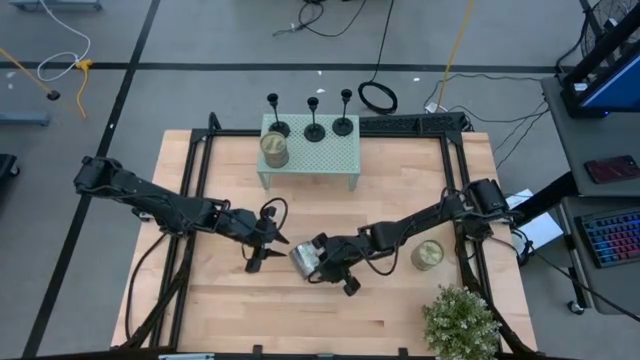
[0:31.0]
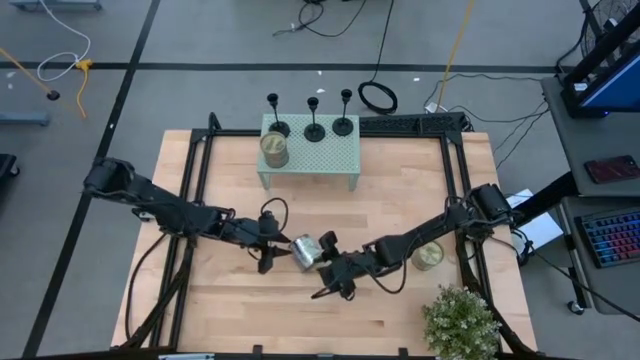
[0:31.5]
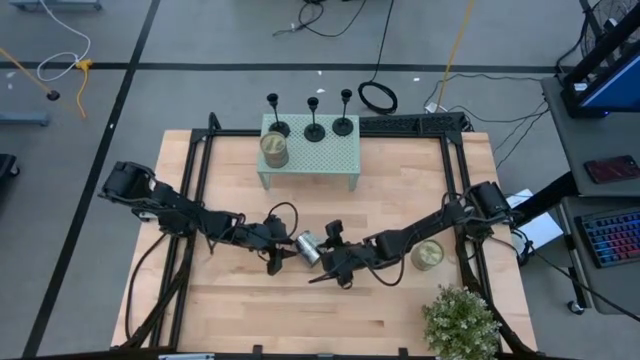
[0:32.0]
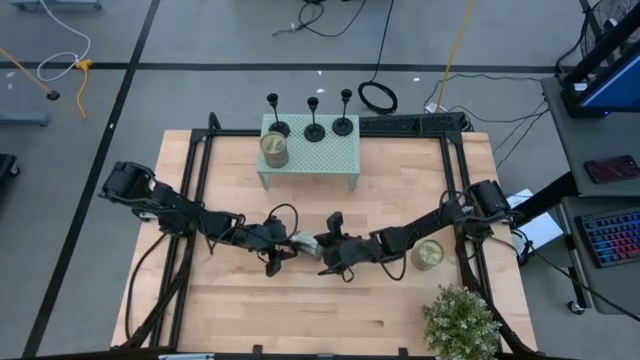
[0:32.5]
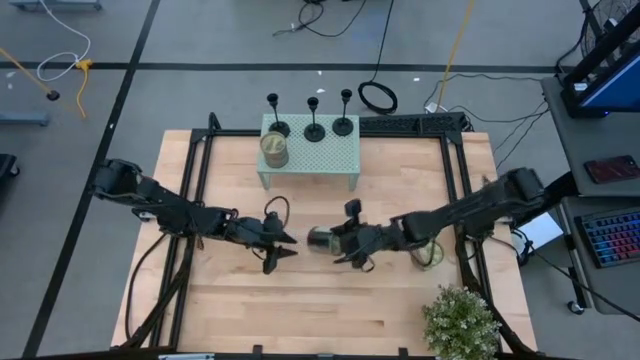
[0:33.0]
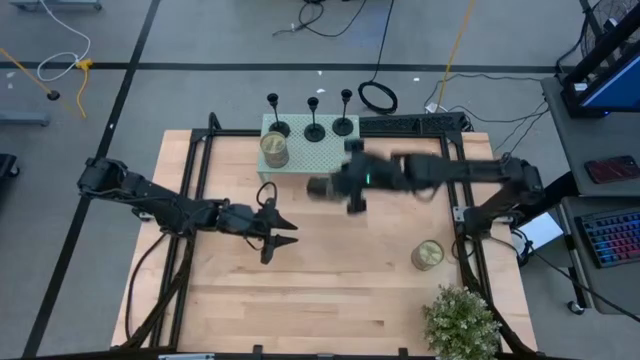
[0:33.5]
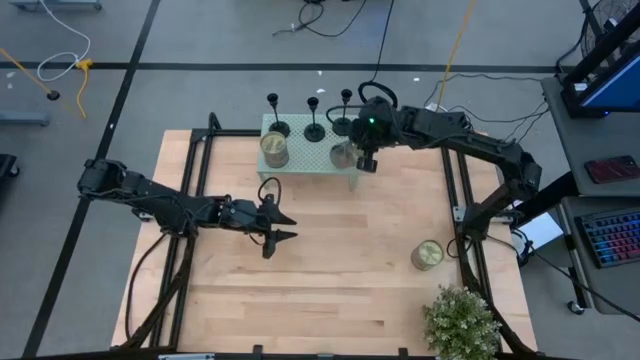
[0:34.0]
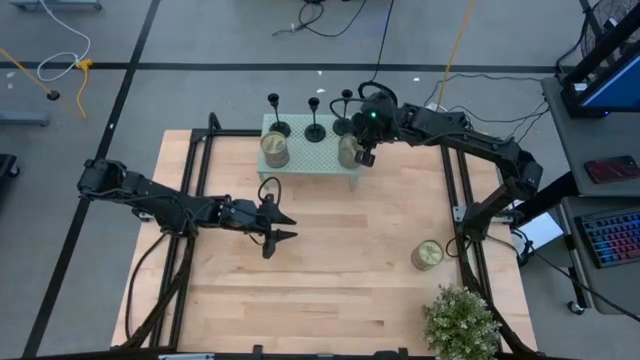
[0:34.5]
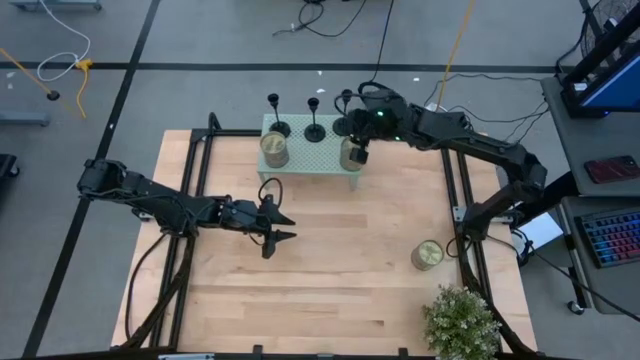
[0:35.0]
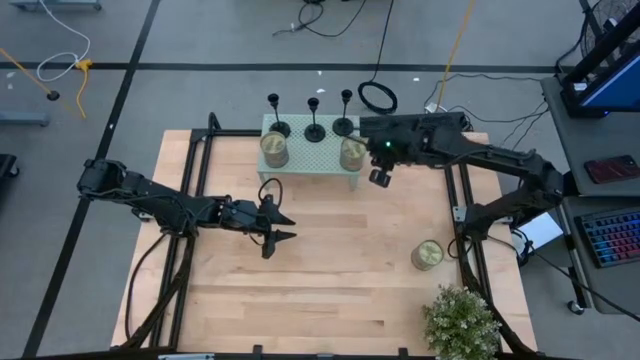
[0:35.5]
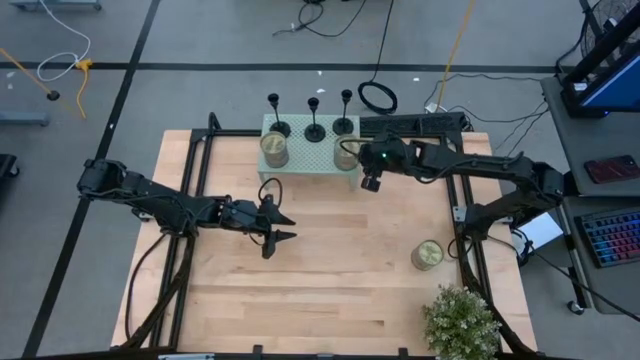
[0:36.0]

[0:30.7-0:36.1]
Task: Pick & Place candle stick holders
Put the scented candle on the shelf

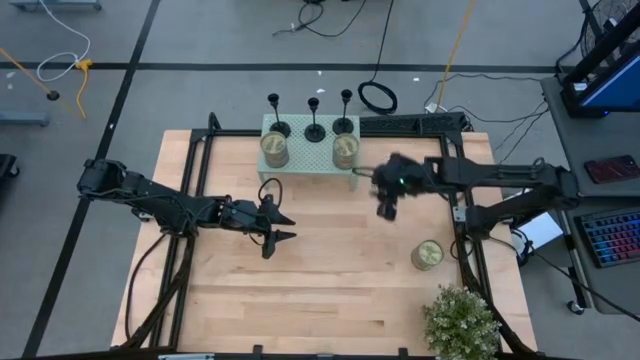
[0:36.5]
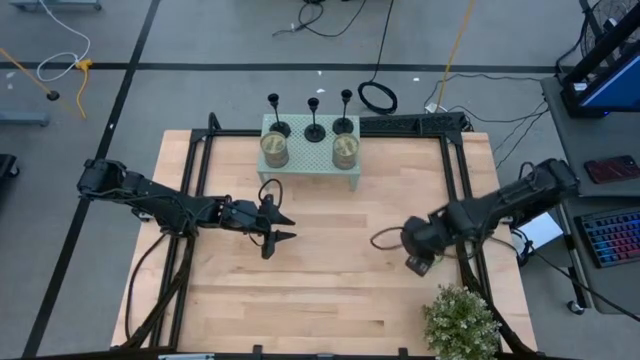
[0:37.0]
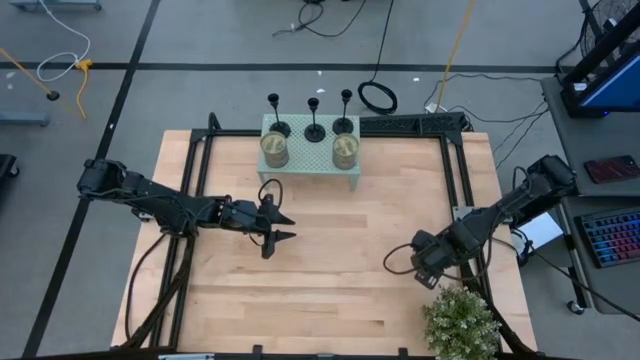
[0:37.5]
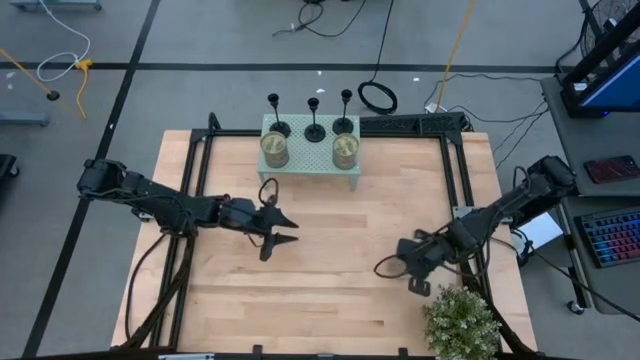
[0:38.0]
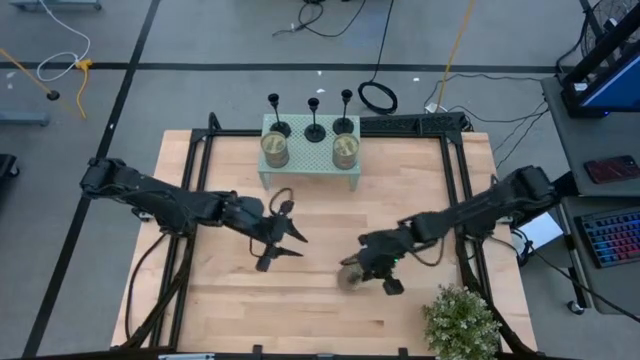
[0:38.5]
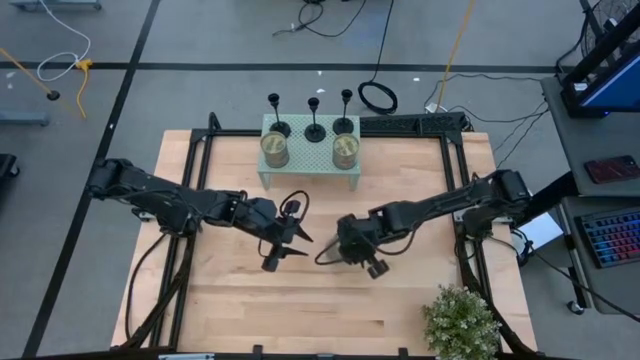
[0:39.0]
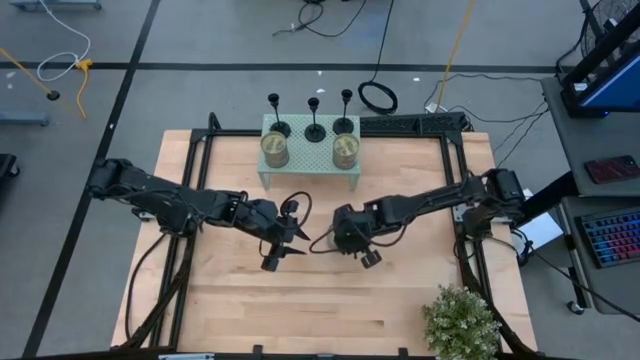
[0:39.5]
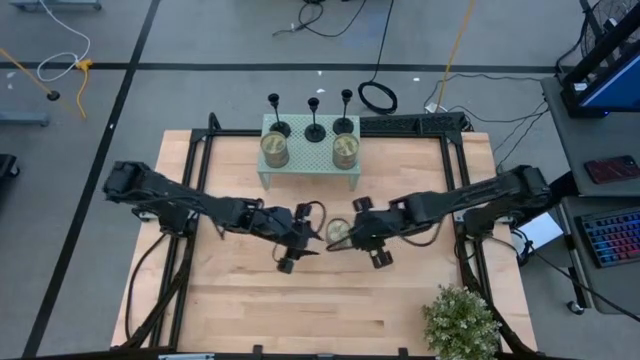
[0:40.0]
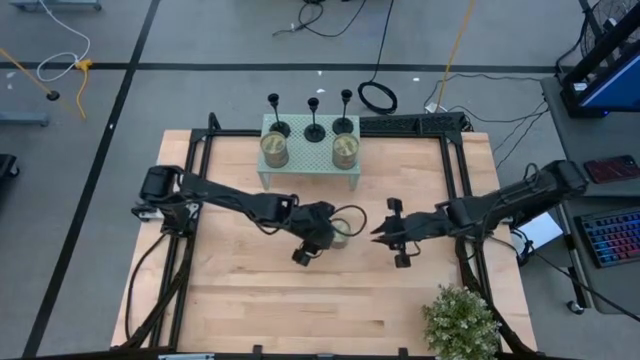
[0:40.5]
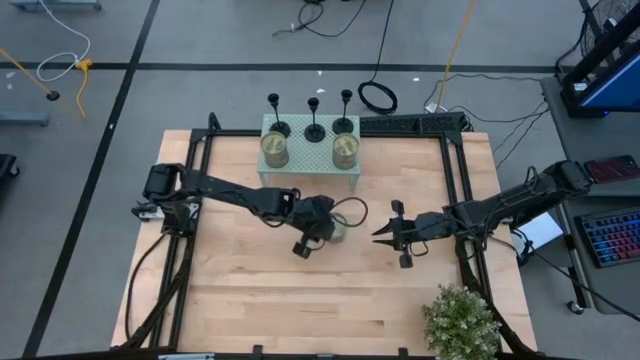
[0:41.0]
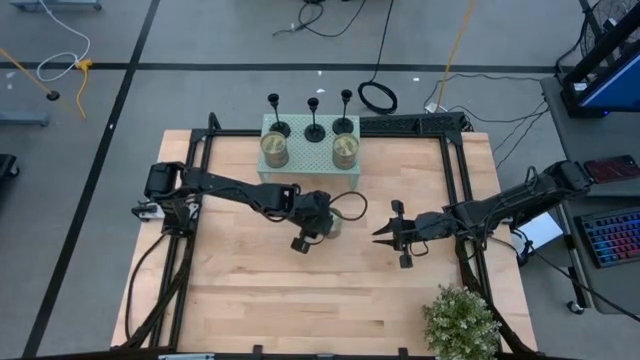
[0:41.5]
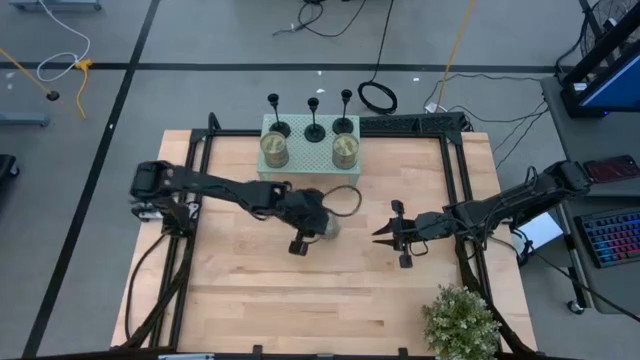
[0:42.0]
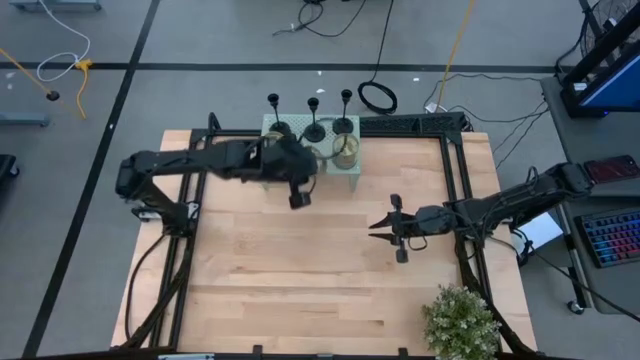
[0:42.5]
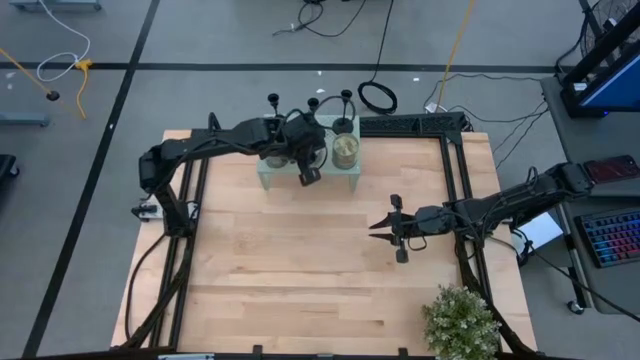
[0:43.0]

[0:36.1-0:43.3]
Put the scented candle on the shelf

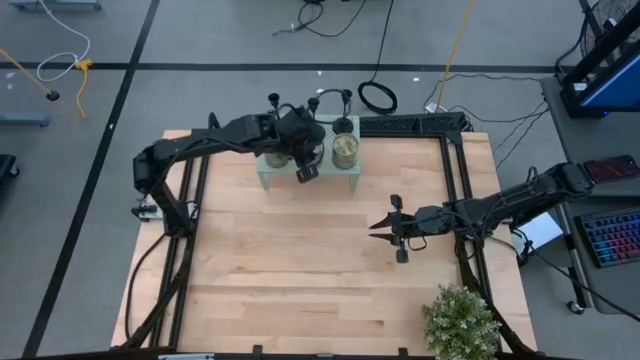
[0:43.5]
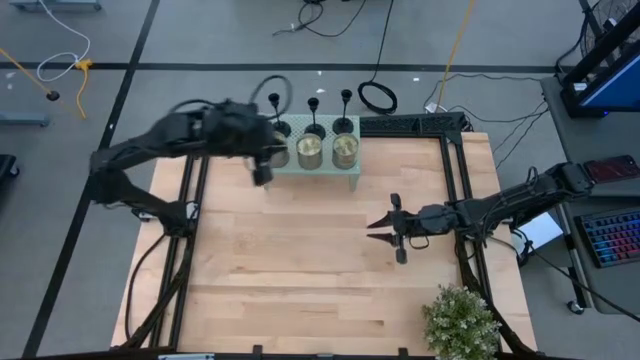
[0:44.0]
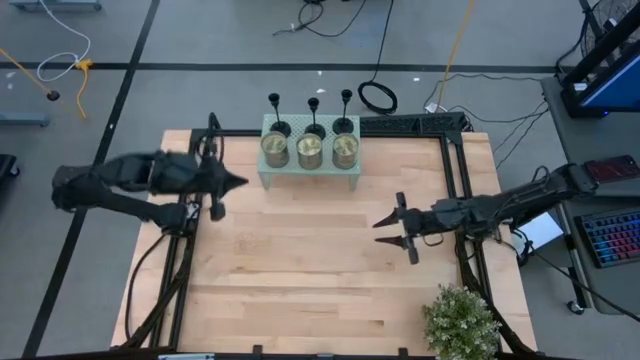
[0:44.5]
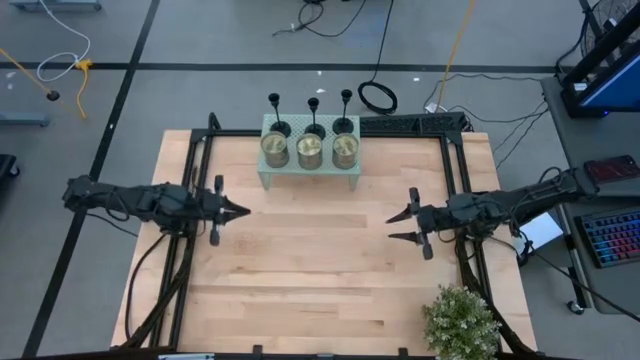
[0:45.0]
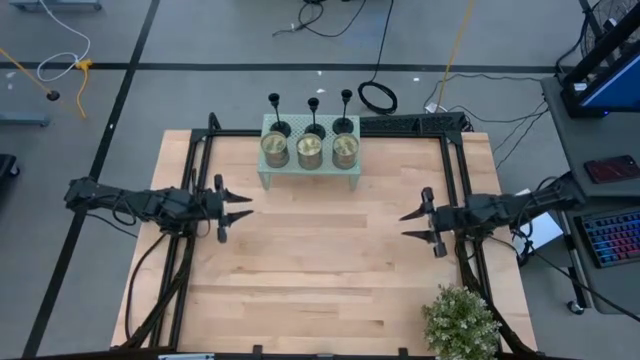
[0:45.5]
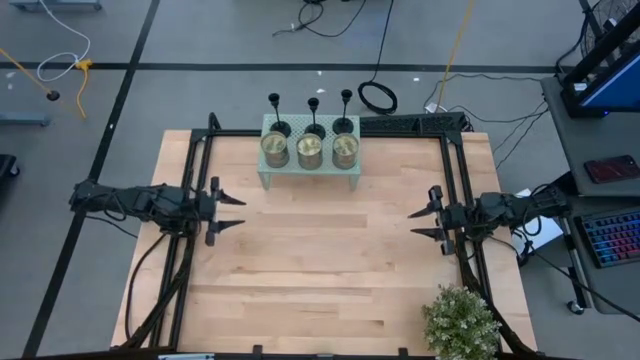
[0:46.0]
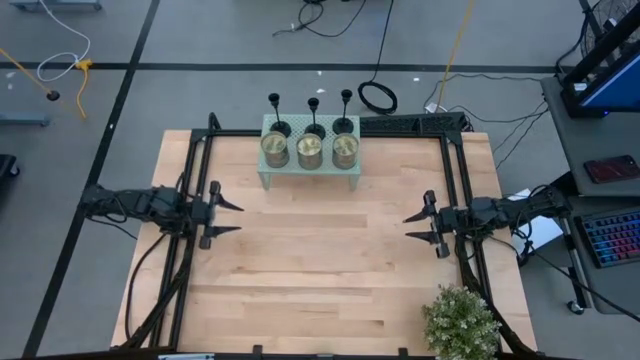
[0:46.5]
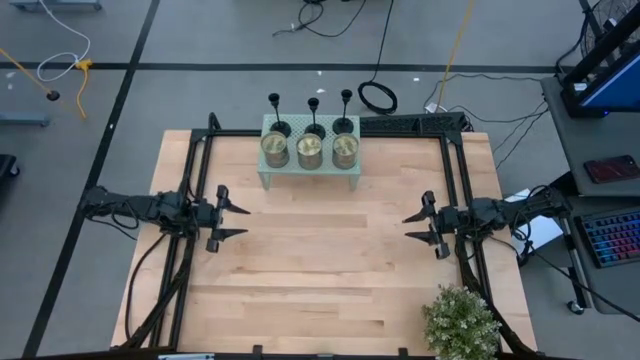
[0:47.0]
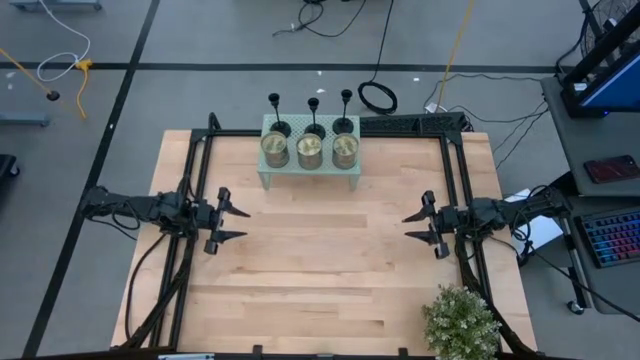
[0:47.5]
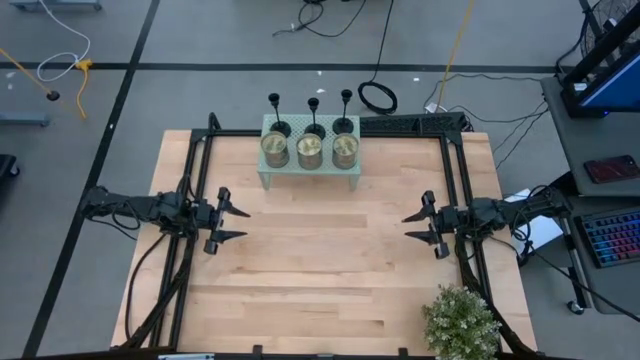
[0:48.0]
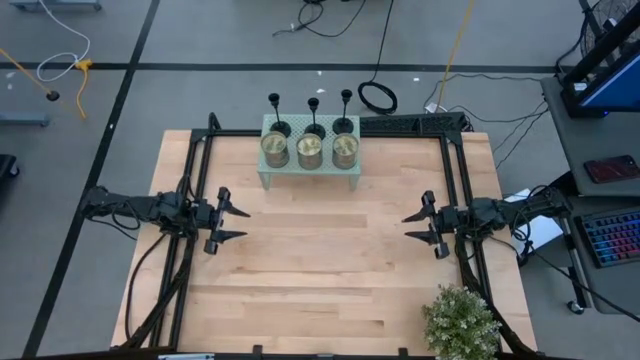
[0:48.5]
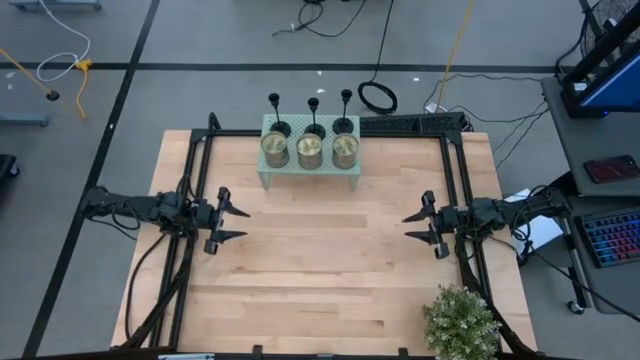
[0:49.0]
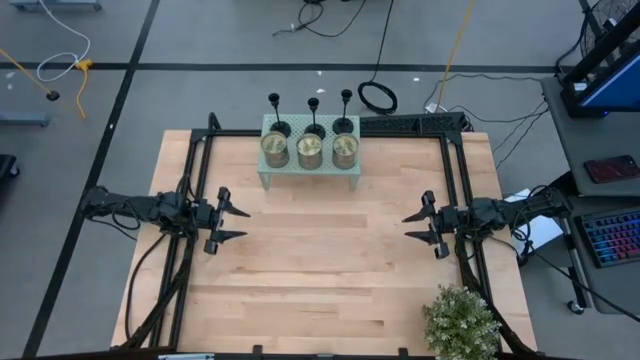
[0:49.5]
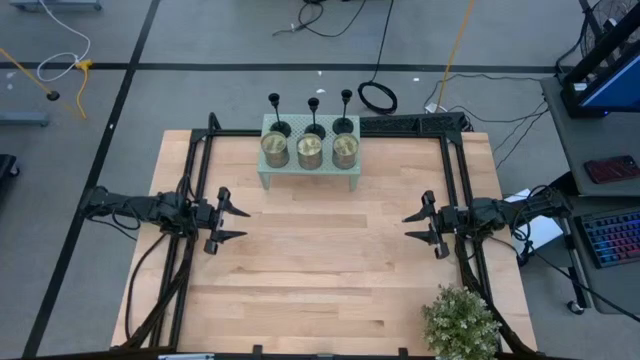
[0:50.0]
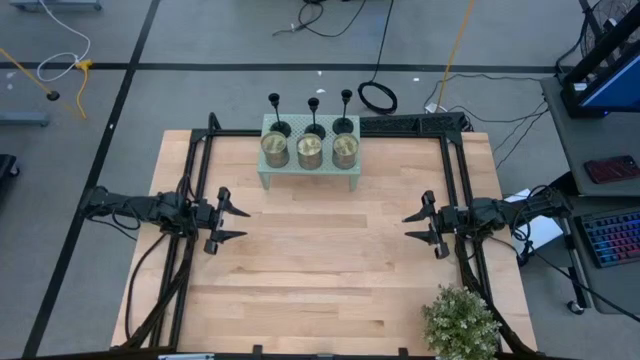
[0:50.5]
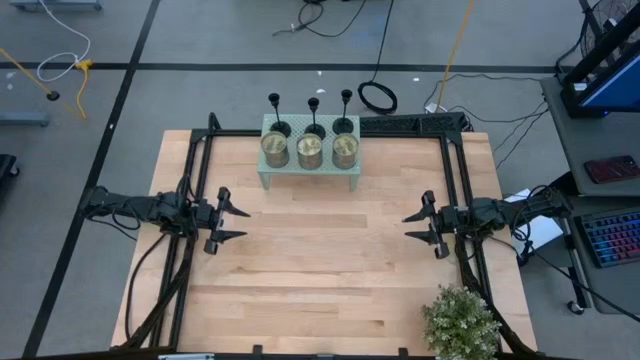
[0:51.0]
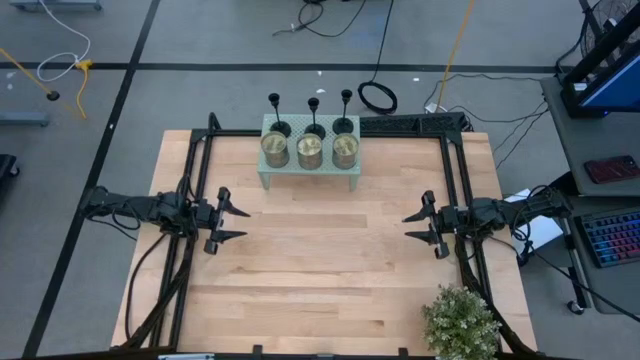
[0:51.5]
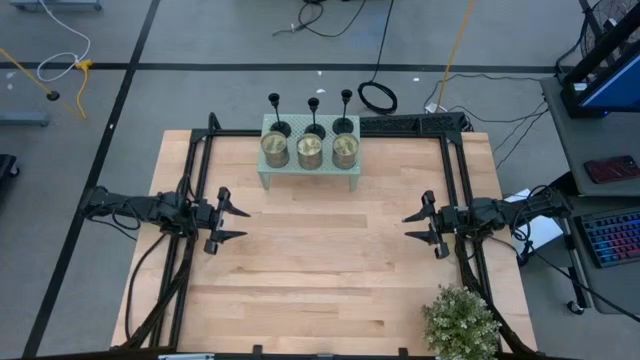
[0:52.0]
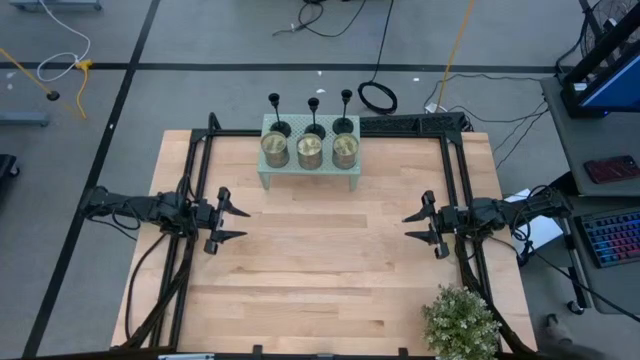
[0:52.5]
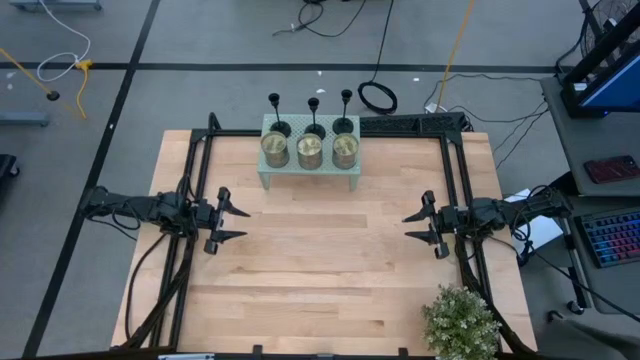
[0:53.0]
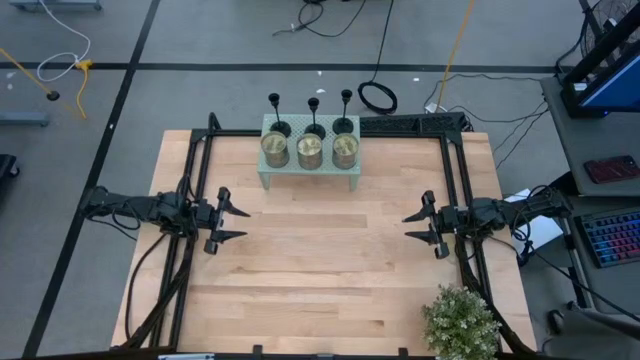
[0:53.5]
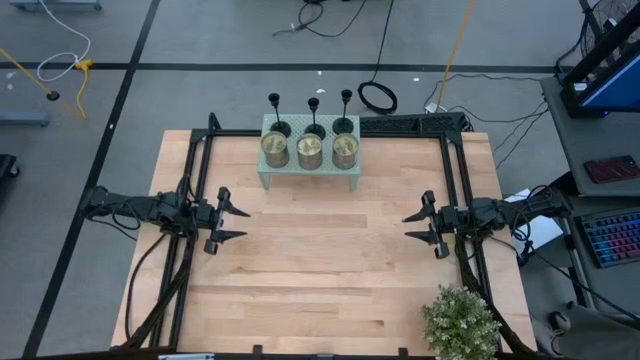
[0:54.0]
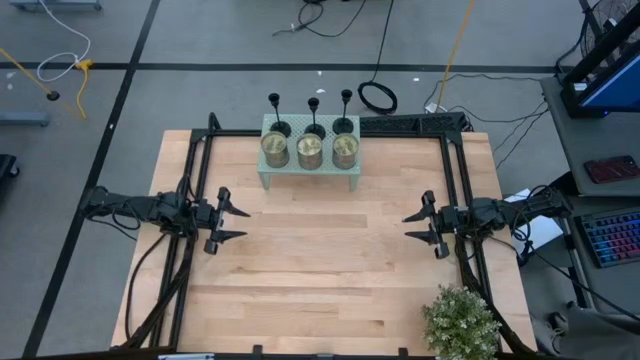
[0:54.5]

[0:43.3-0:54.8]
Return to Home Position
